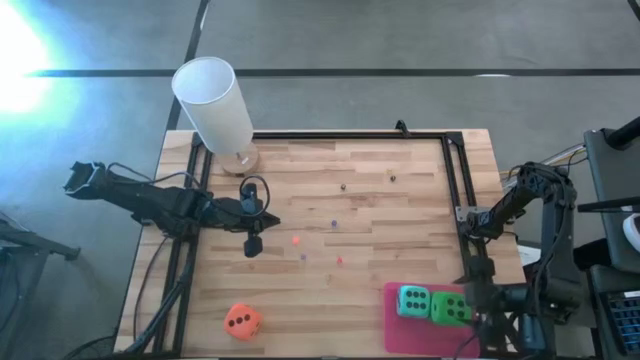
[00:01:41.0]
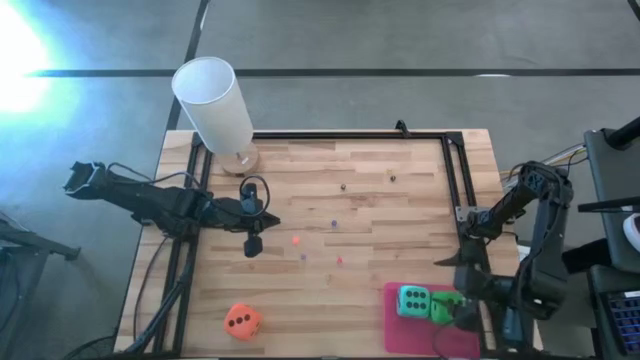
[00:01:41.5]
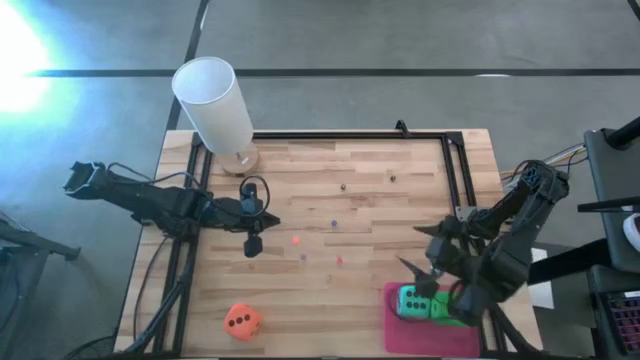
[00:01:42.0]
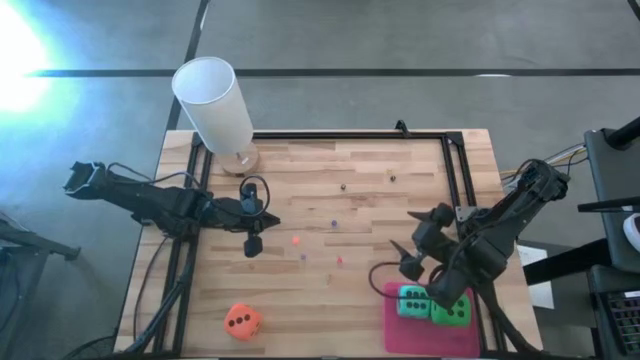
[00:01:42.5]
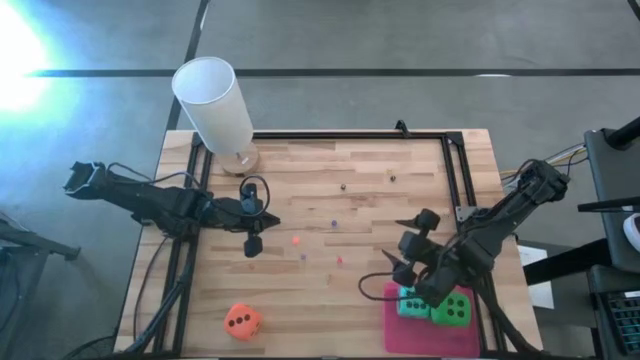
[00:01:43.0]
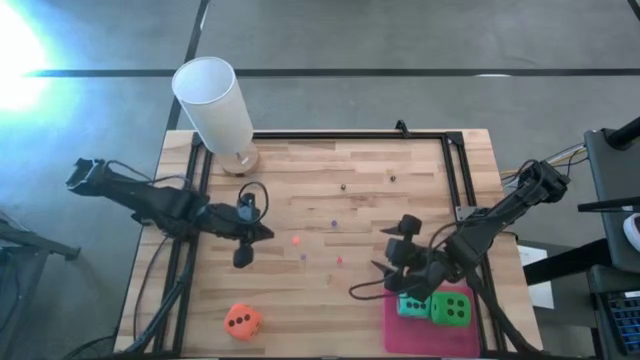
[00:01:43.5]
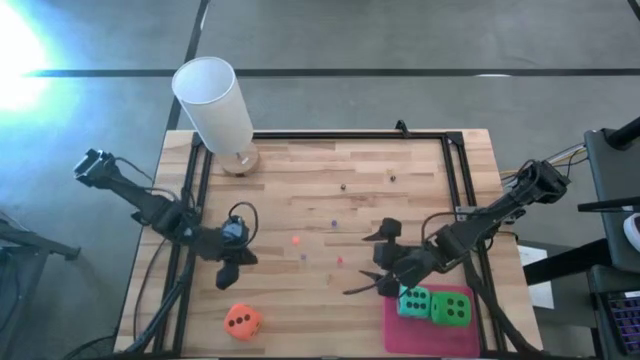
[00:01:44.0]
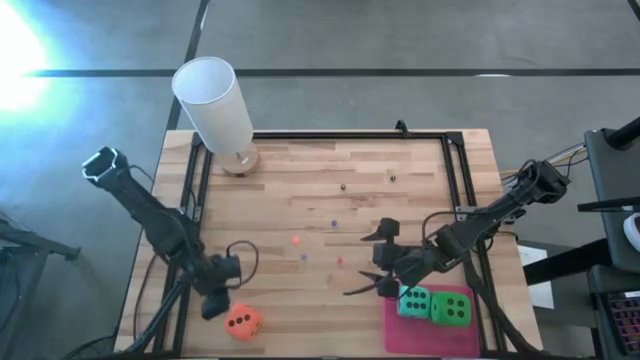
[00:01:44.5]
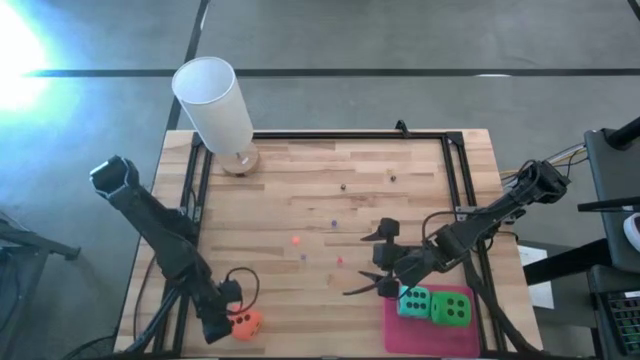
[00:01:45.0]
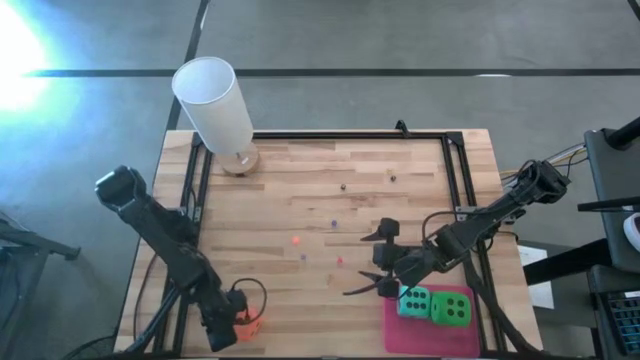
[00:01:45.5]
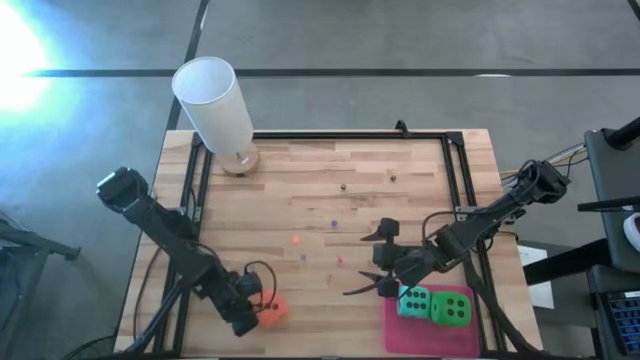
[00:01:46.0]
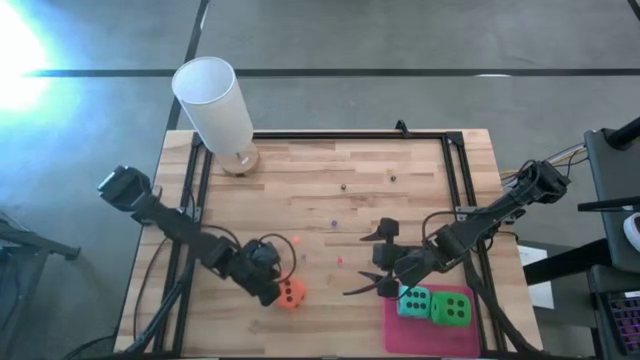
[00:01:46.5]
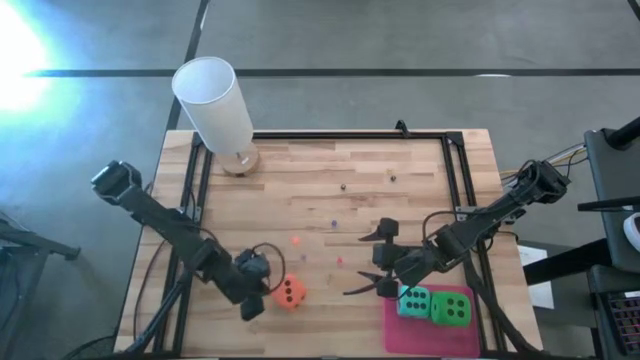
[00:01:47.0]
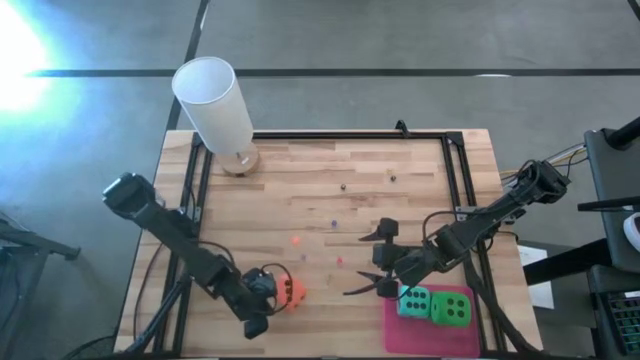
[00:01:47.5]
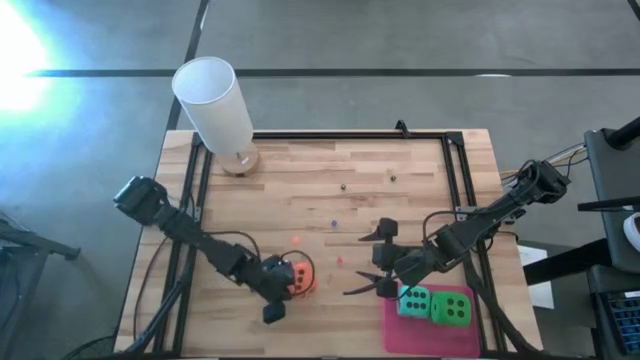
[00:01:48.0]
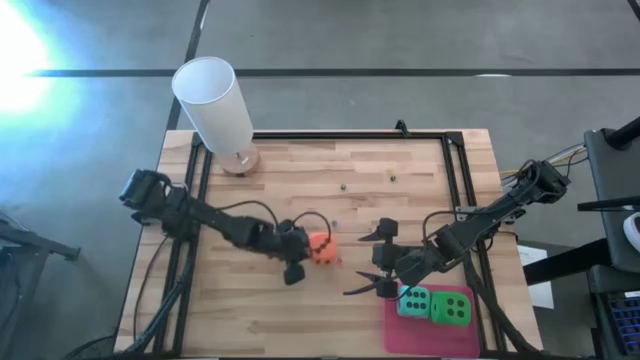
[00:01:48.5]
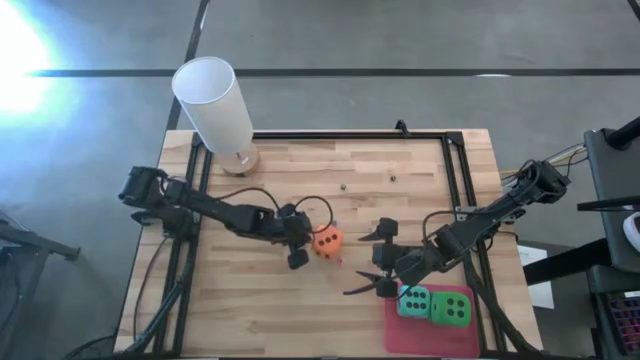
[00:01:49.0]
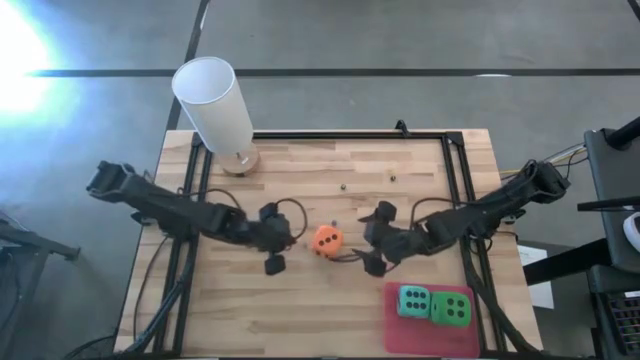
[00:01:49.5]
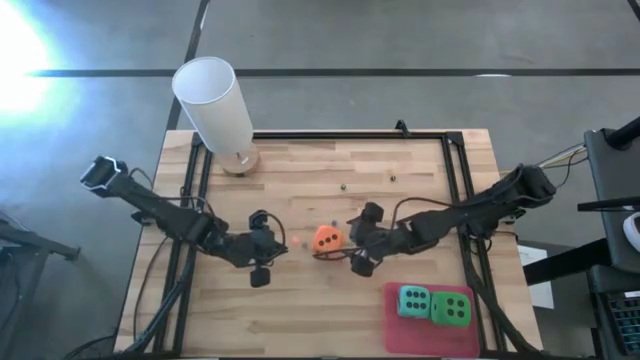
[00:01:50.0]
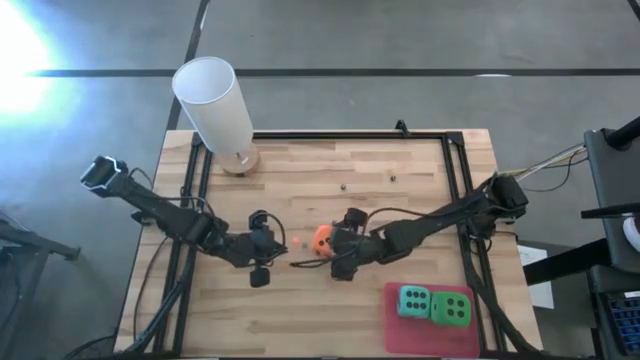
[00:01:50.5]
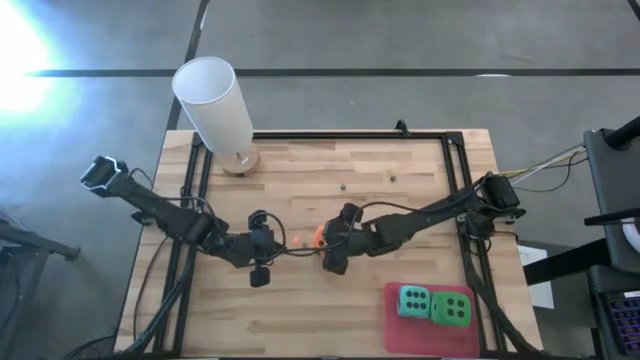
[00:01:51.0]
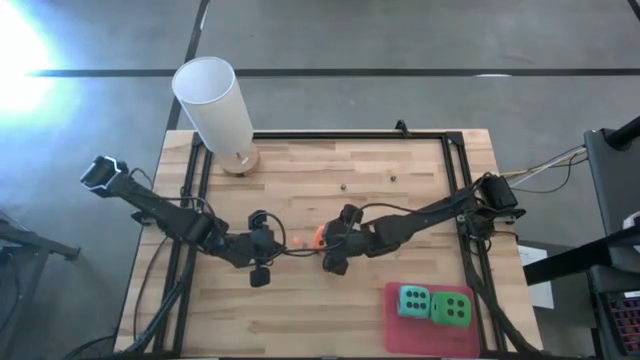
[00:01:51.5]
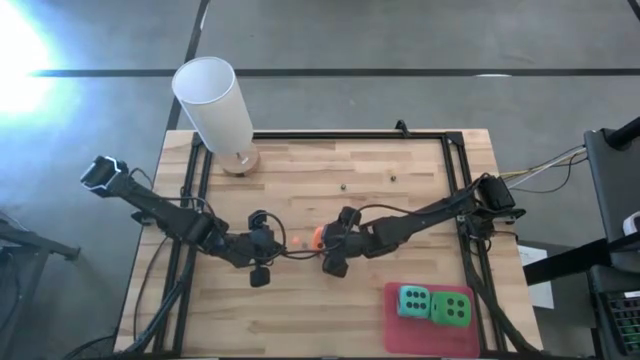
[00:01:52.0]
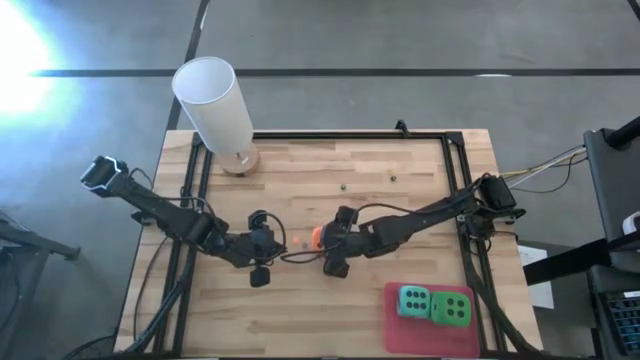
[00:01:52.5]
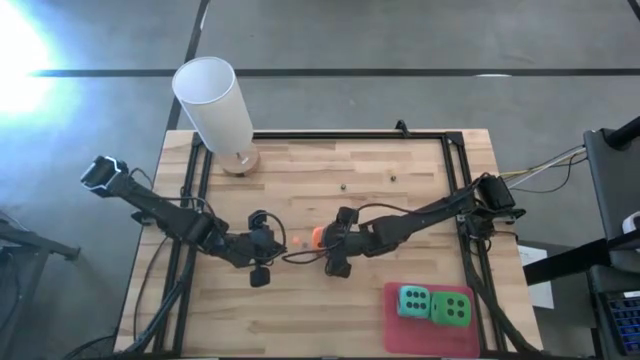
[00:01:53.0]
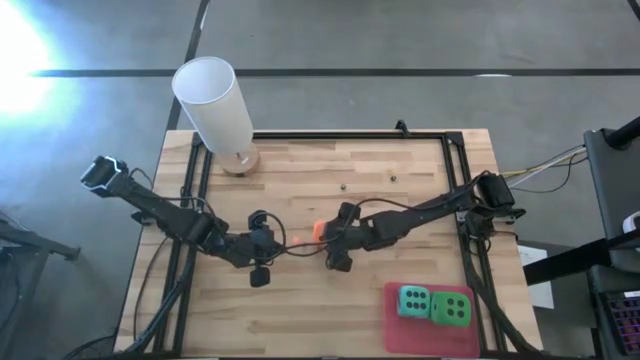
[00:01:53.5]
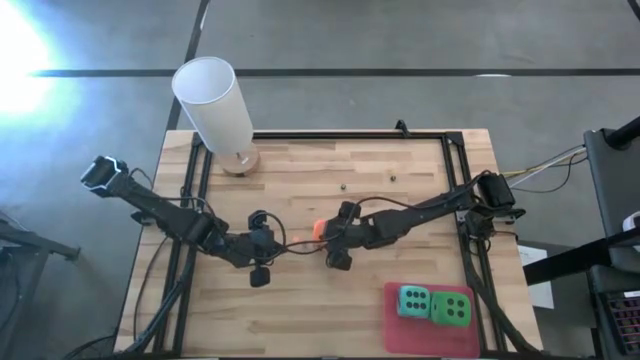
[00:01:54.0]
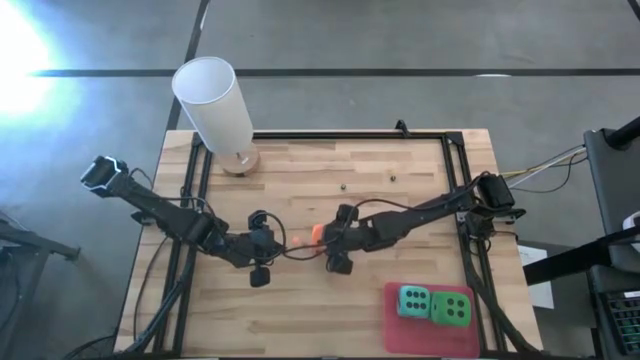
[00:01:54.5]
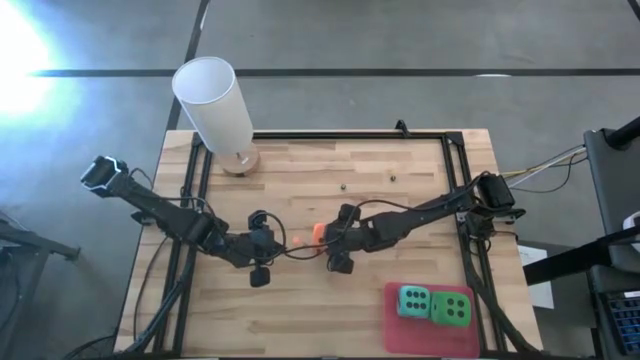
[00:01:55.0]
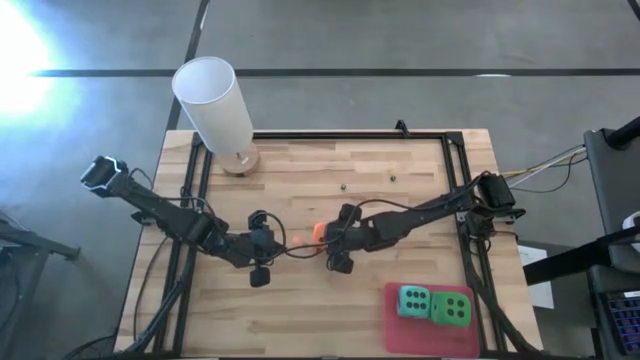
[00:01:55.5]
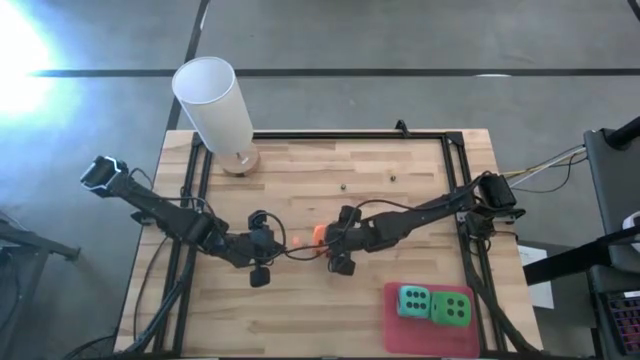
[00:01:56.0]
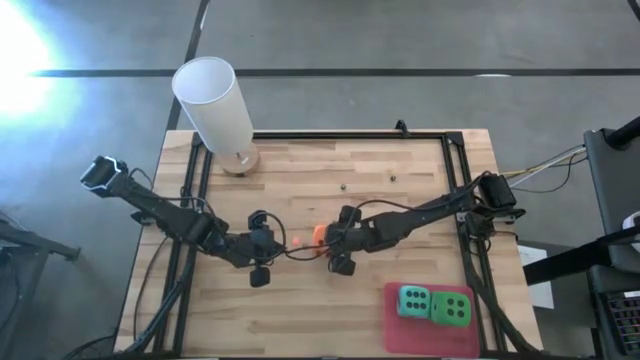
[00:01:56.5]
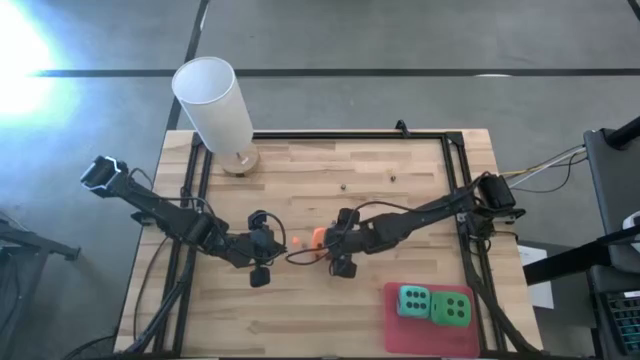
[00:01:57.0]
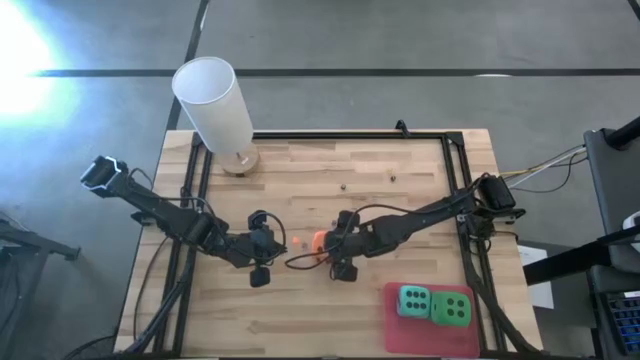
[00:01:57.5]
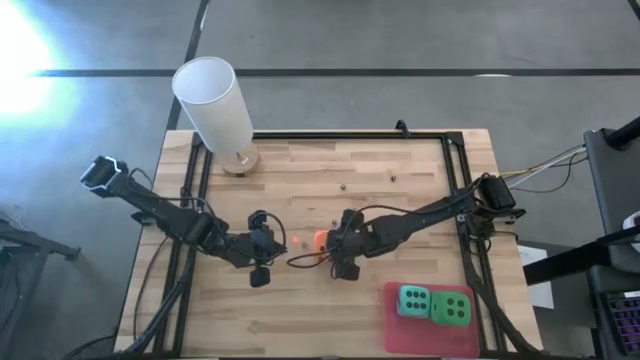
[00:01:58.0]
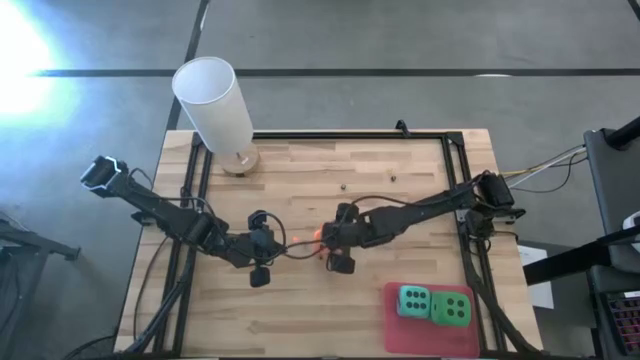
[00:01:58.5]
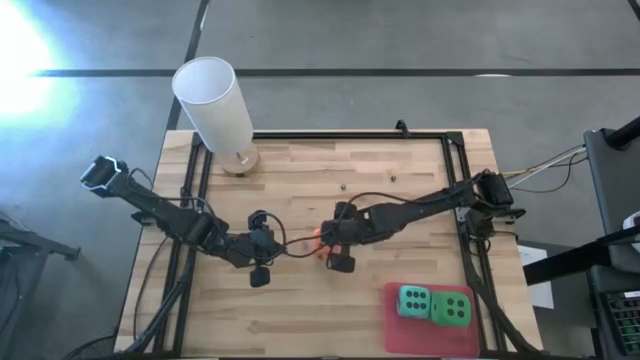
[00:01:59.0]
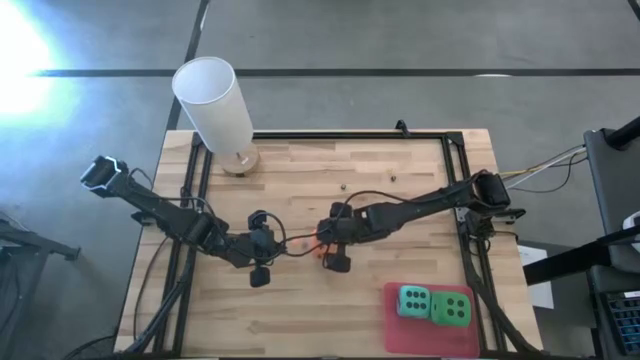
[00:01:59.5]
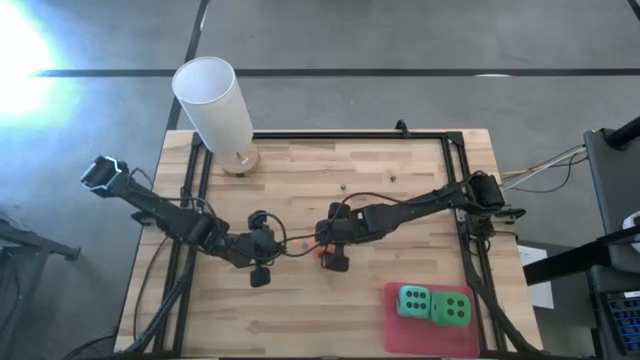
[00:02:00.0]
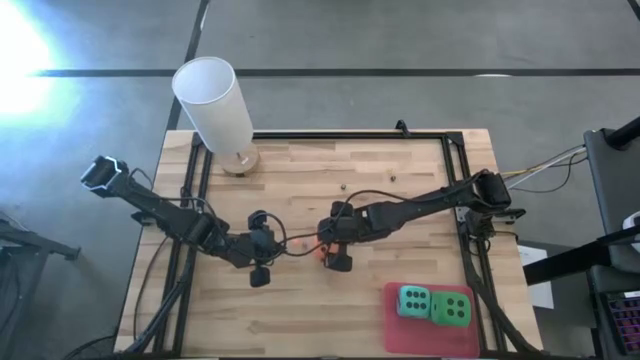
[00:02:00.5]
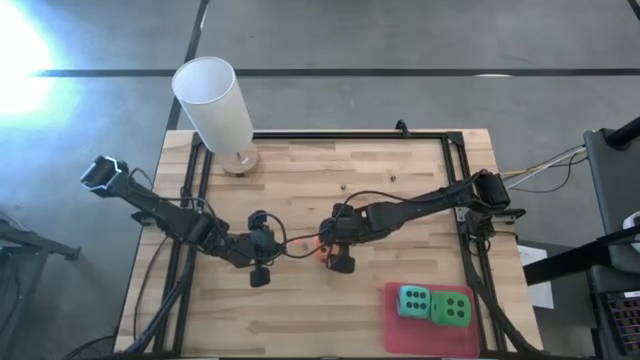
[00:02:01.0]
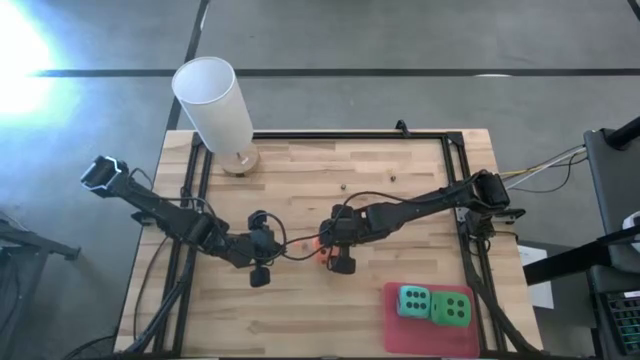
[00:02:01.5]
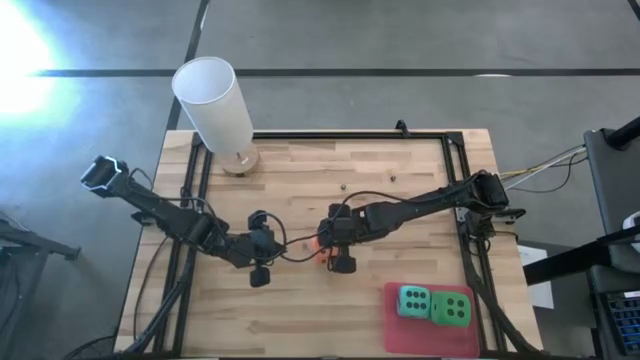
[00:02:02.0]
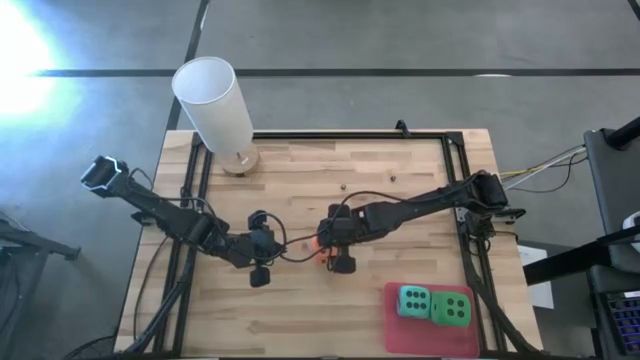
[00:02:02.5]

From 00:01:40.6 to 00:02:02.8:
Task: Pick & Place Dice
Put the large orange die into the bin
